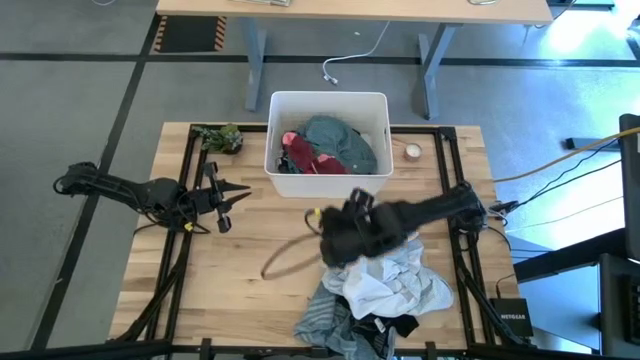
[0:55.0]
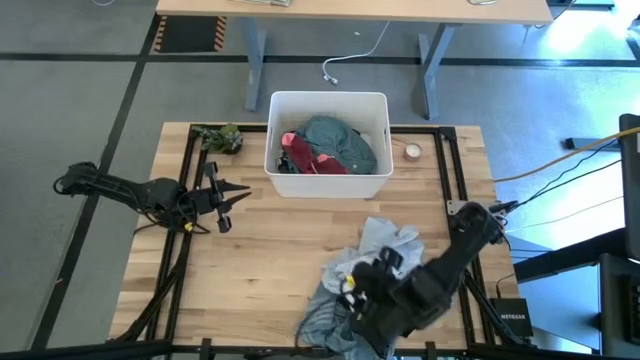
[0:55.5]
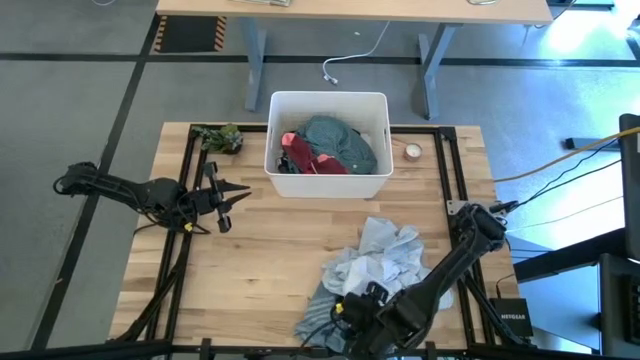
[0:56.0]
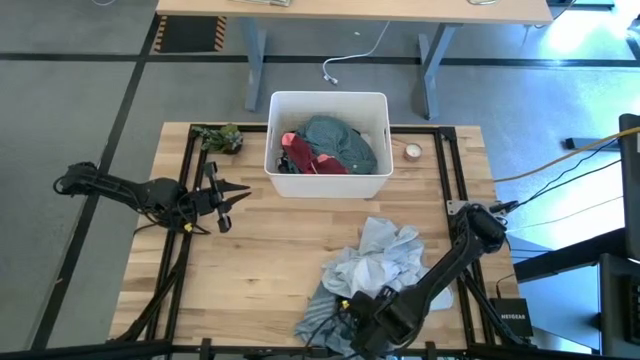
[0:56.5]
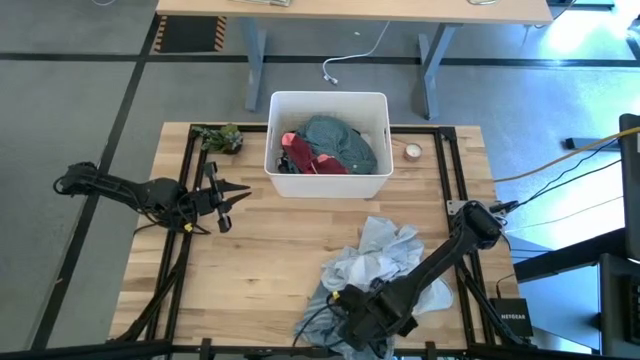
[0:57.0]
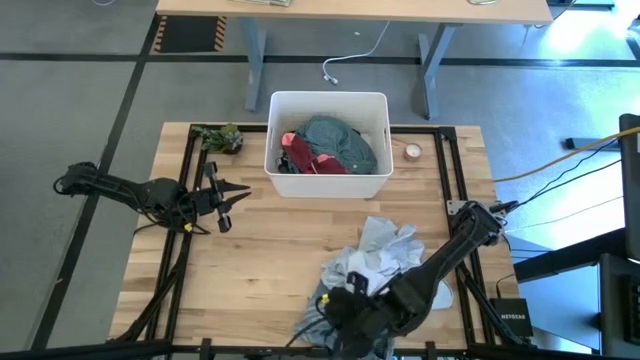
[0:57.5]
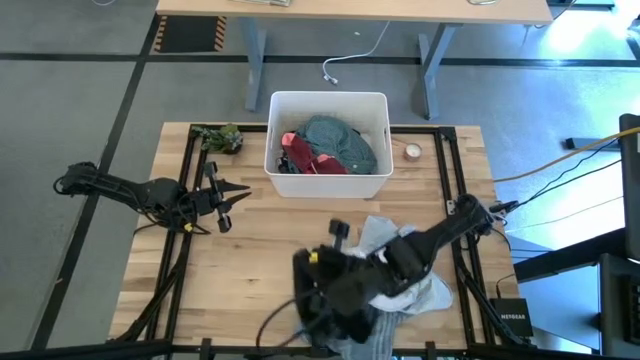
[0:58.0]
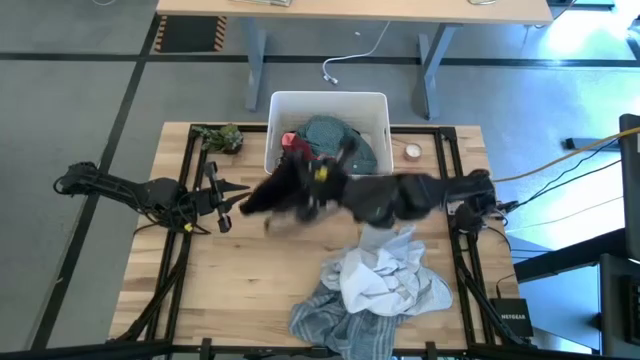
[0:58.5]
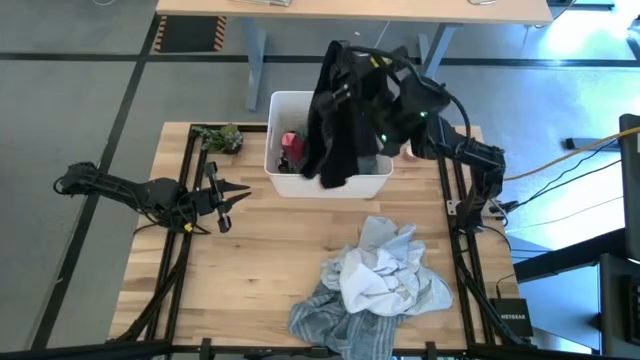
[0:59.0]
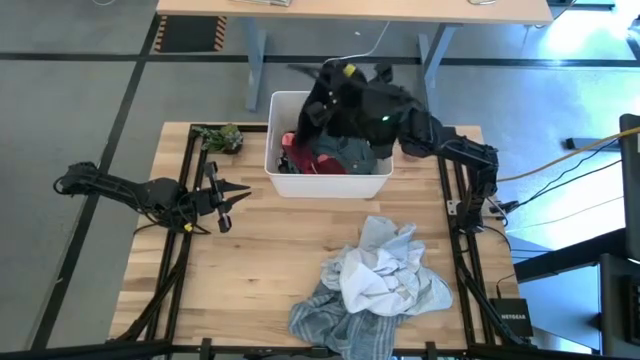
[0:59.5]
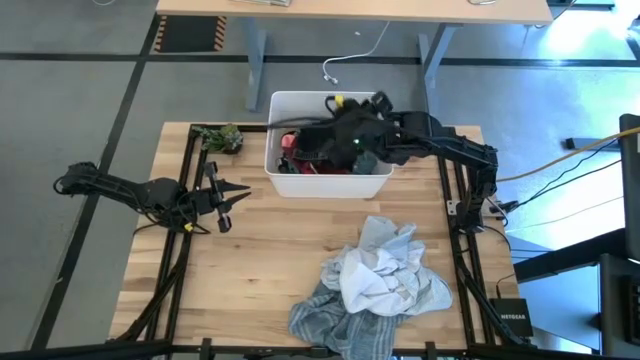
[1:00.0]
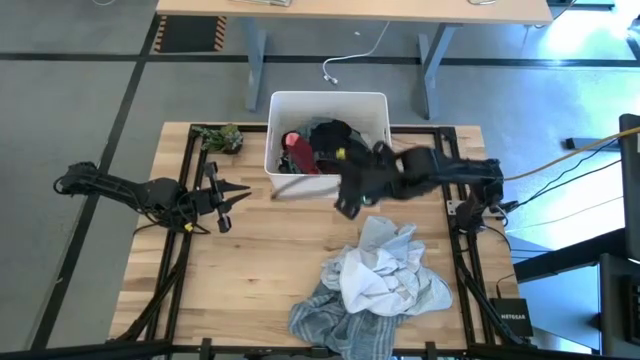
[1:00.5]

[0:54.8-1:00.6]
Task: Sort clothes
Put the black boxers into the white laundry bin

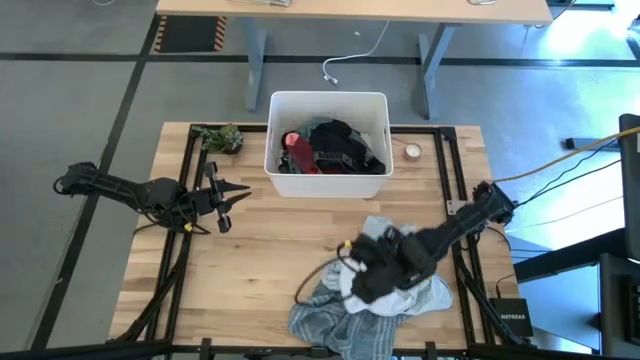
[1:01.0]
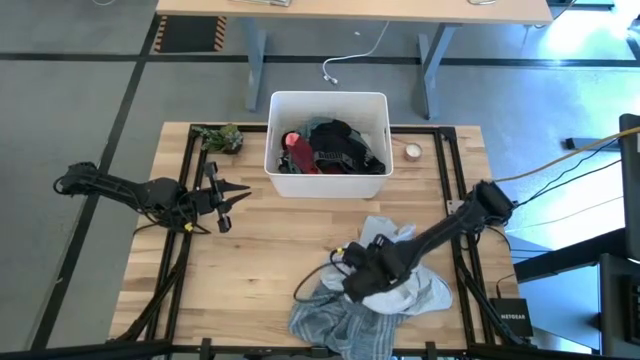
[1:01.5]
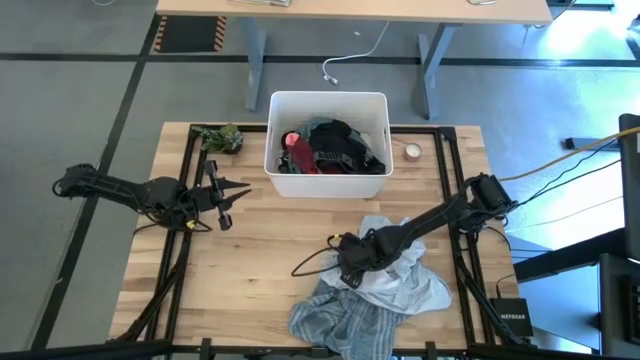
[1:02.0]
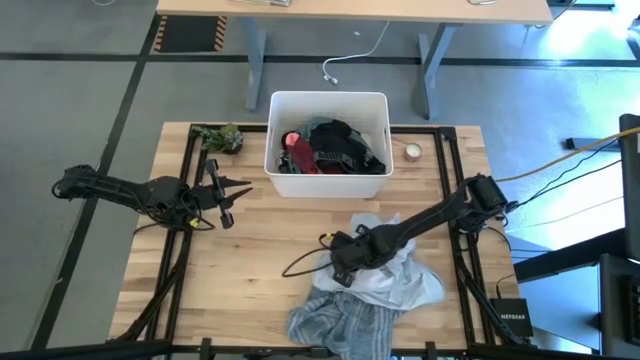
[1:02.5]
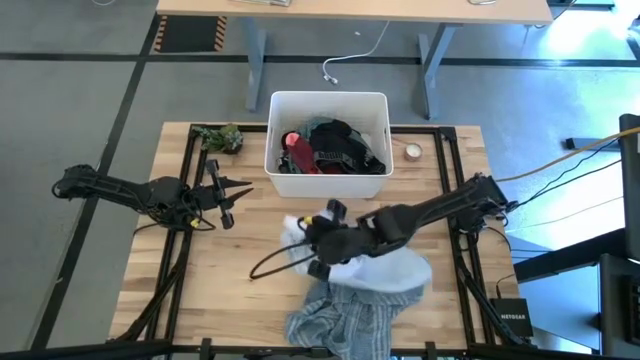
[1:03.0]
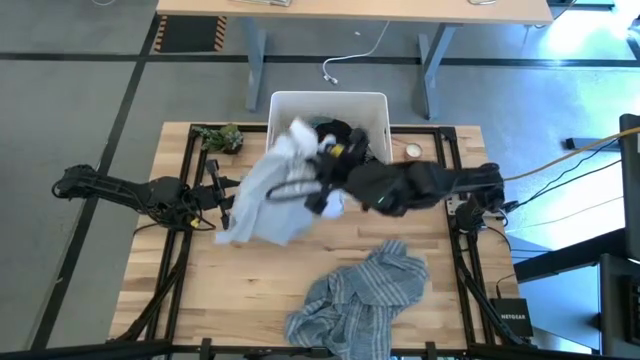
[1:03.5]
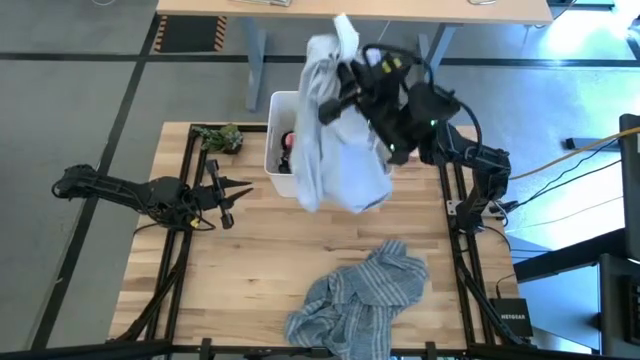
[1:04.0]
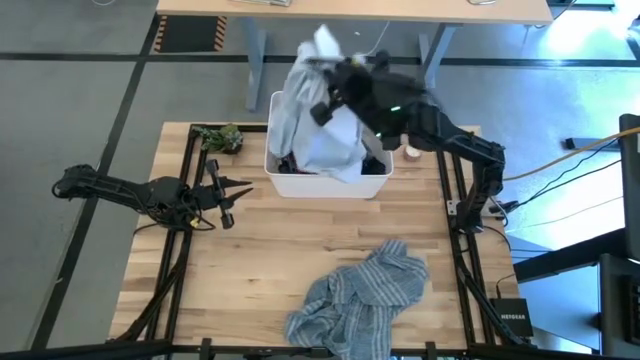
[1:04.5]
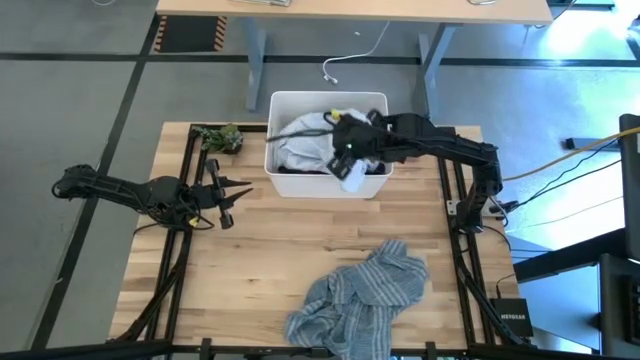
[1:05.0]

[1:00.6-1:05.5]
Put the light blue shirt into the white laundry bin

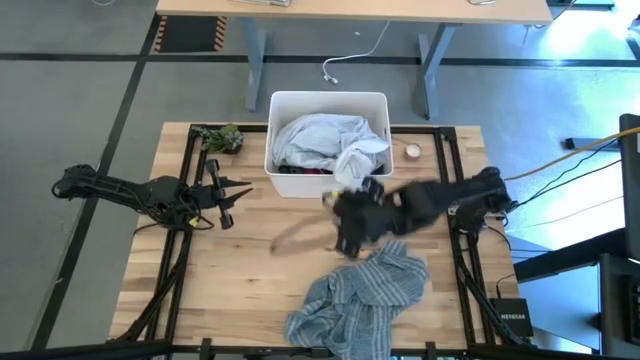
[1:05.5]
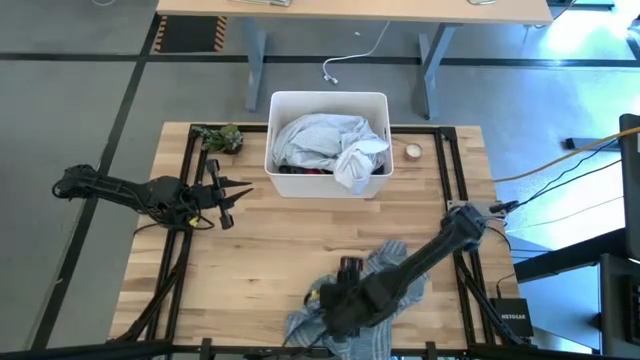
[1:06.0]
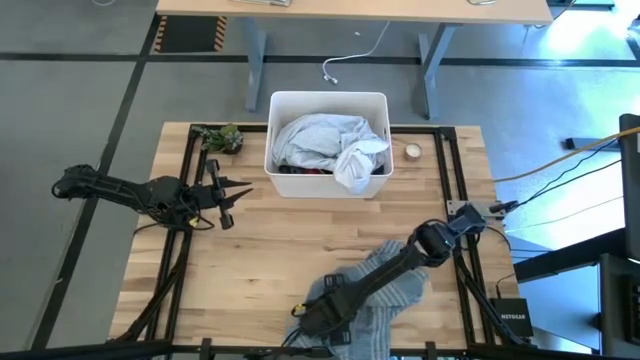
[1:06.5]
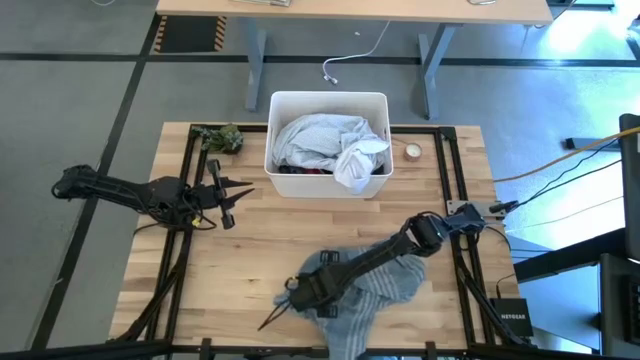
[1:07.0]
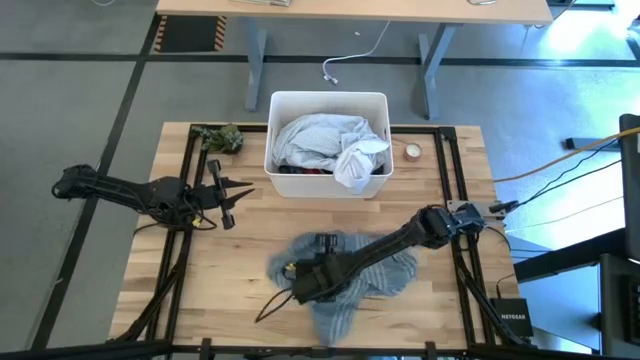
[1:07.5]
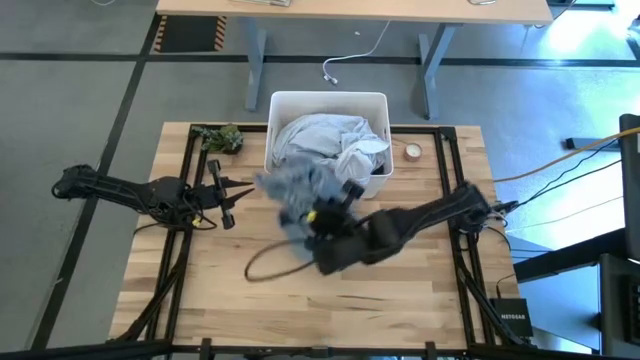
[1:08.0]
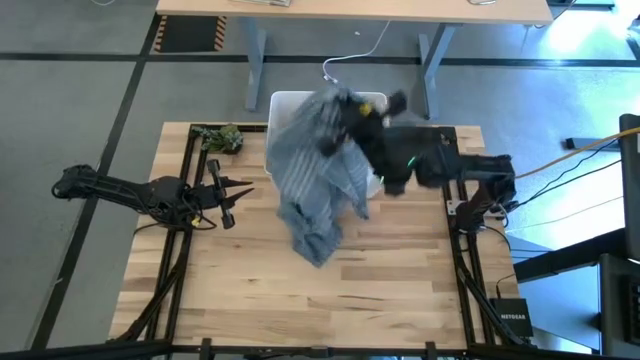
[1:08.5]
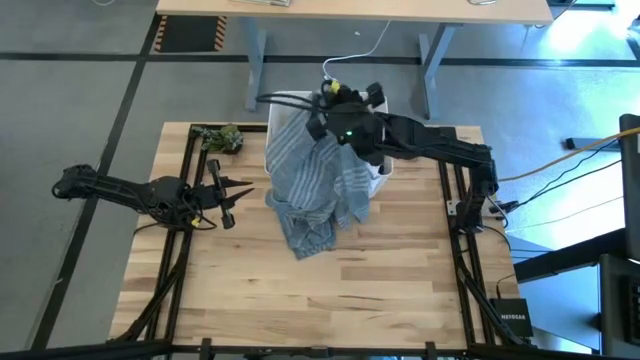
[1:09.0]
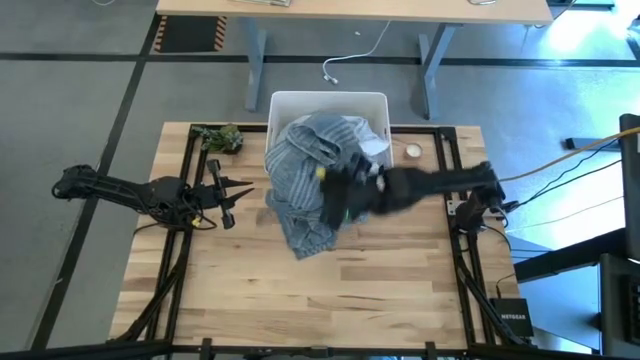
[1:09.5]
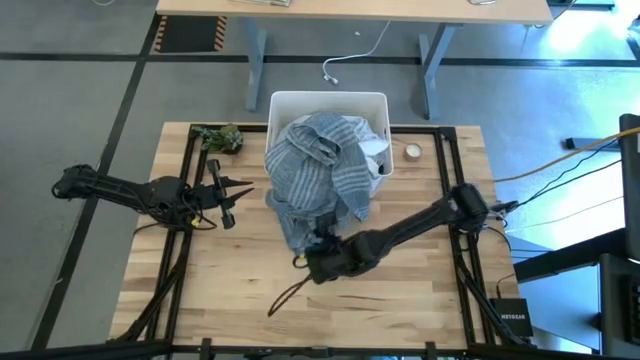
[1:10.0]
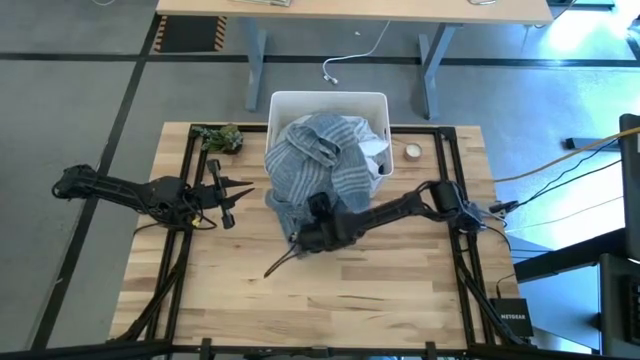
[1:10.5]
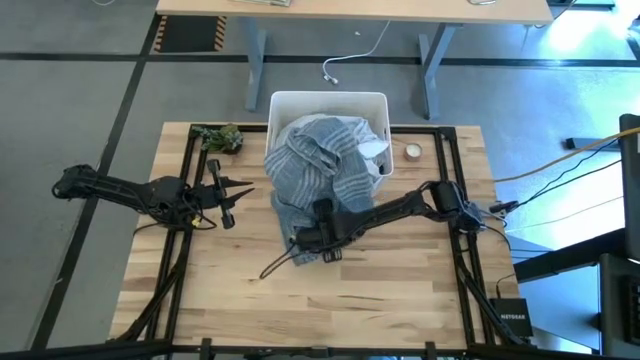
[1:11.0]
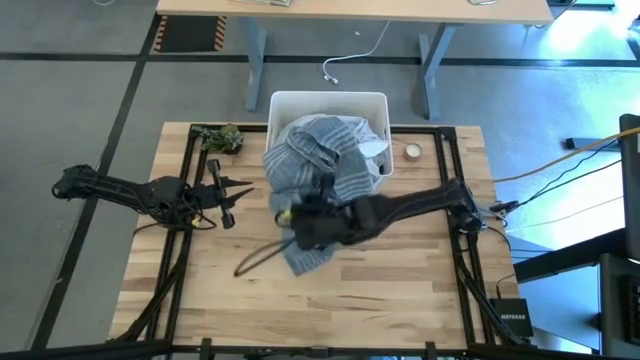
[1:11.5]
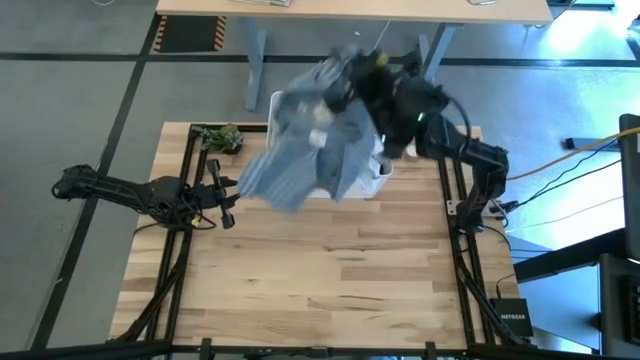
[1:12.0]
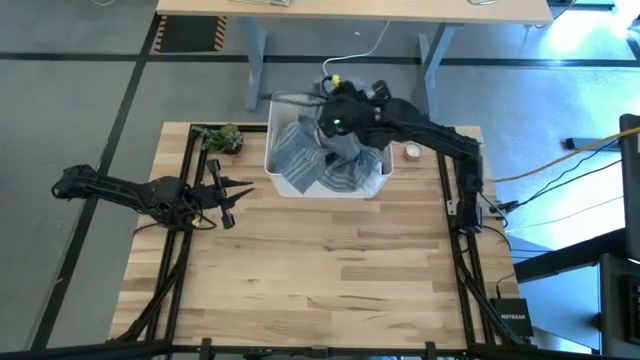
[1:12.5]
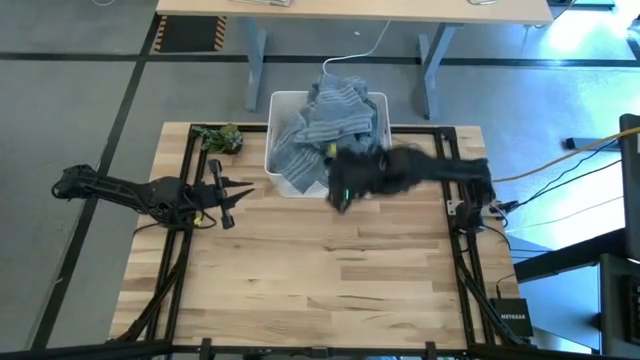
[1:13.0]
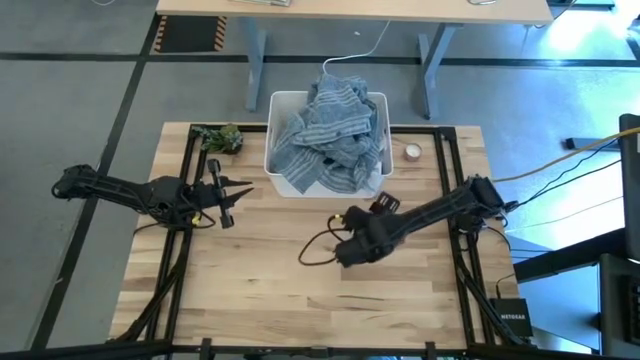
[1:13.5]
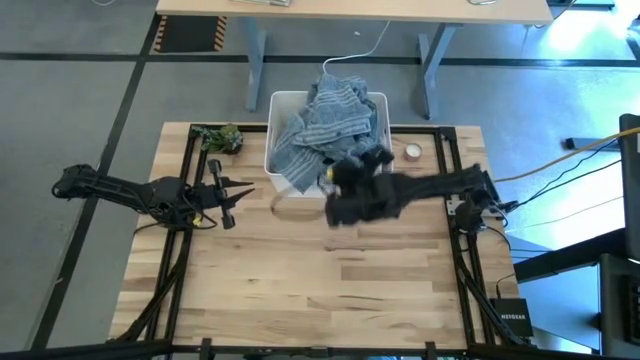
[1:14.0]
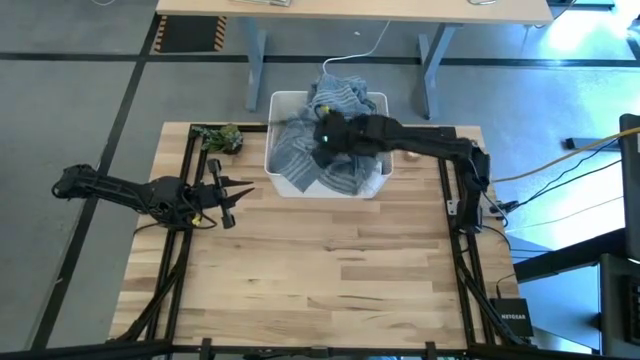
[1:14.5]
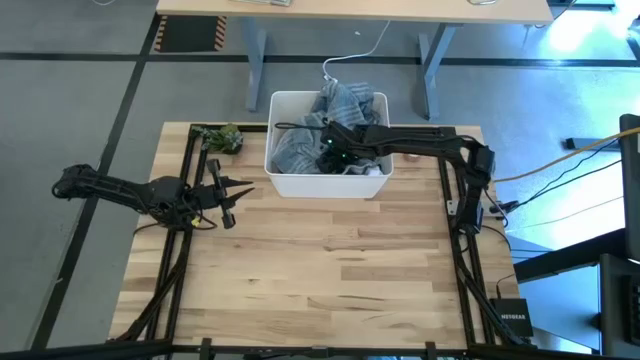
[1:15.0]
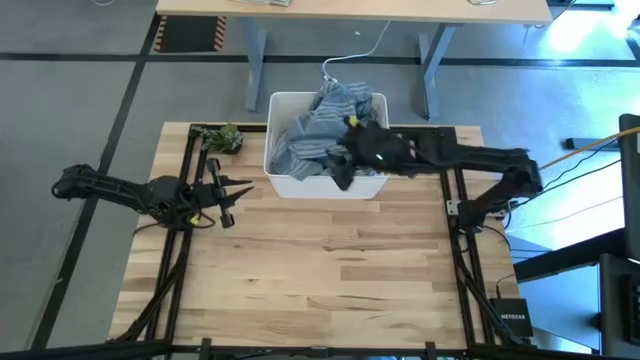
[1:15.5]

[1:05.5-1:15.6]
Put the blue plaid shirt into the white laundry bin

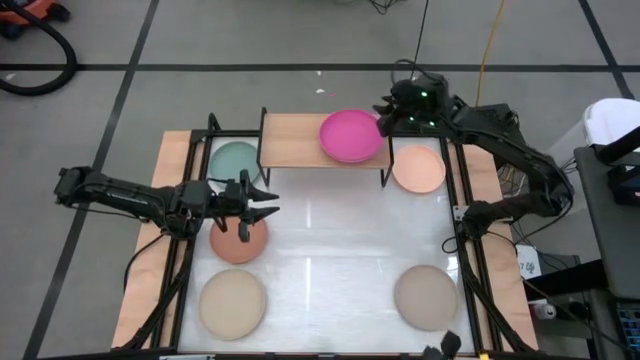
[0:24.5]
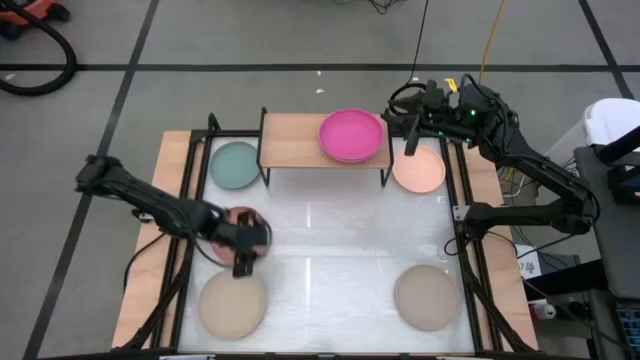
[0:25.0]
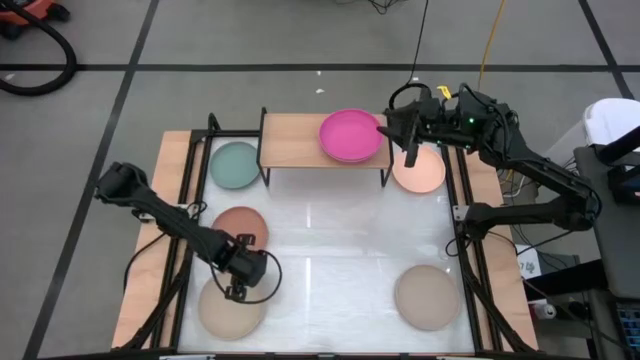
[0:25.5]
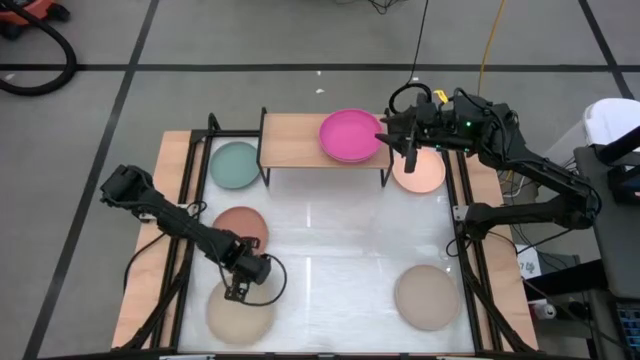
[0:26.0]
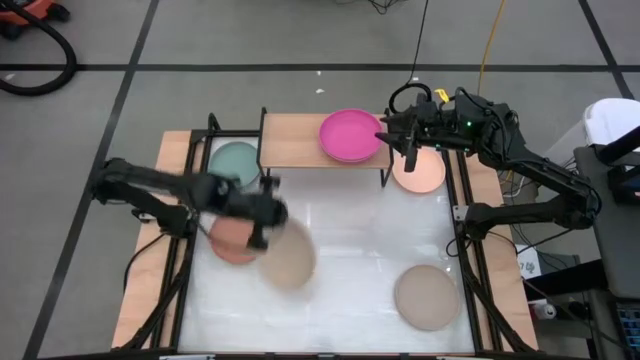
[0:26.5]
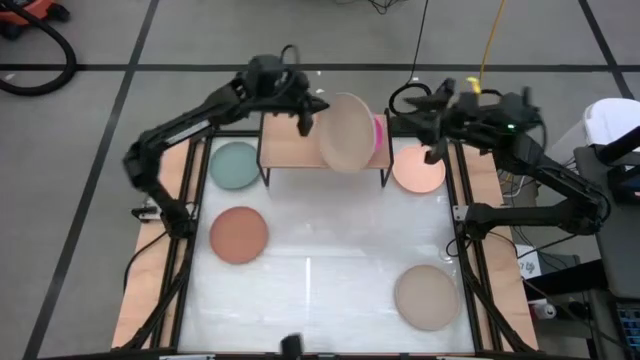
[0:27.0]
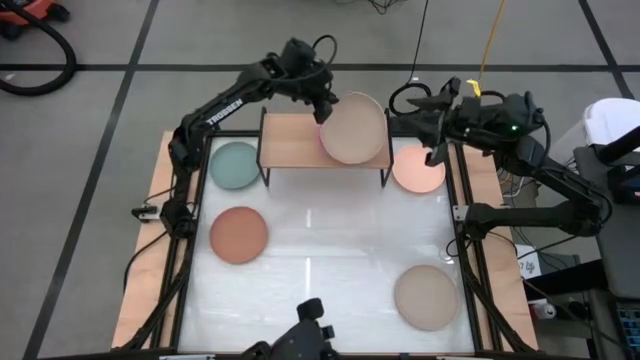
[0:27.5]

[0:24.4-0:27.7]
Task: Place and stack plates onto a shelf
Stack the light gray plate on the pink plate on the shelf
